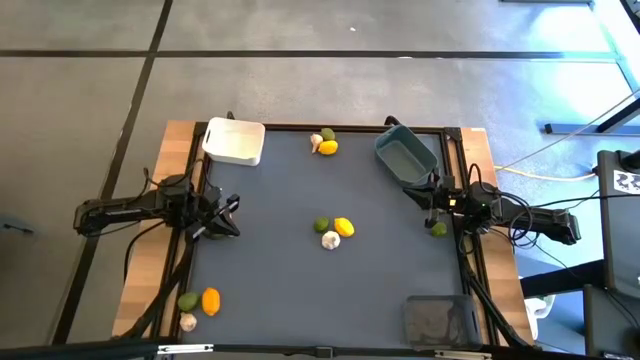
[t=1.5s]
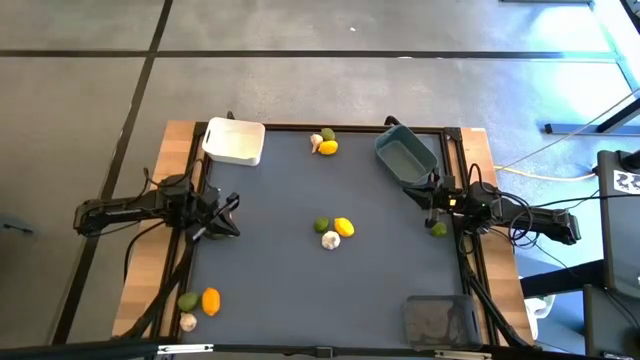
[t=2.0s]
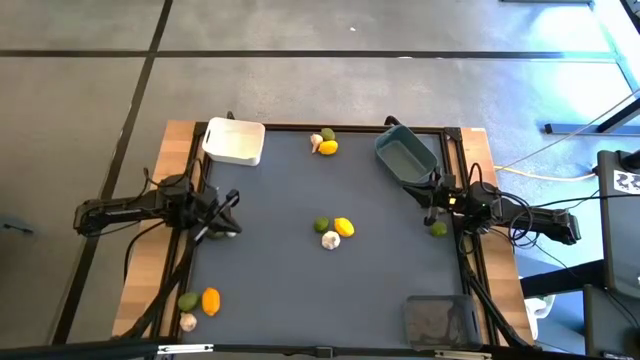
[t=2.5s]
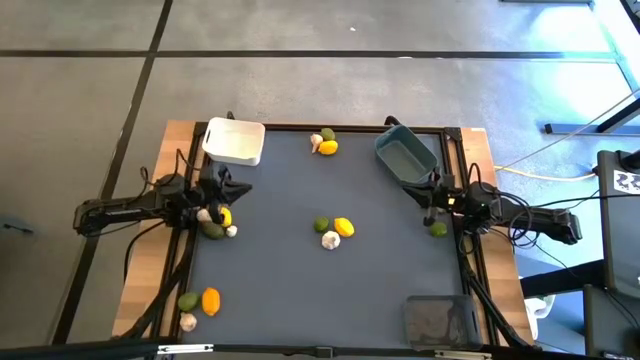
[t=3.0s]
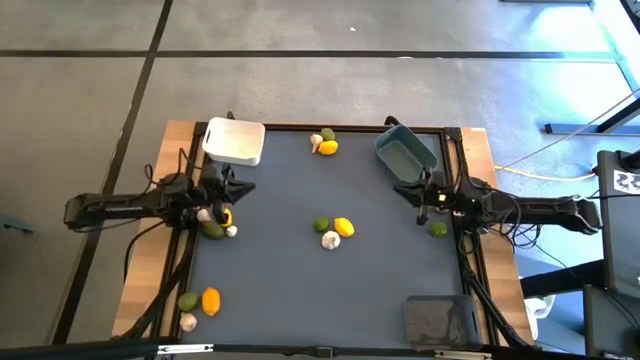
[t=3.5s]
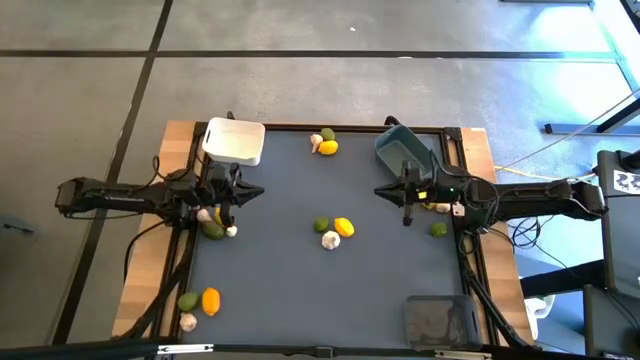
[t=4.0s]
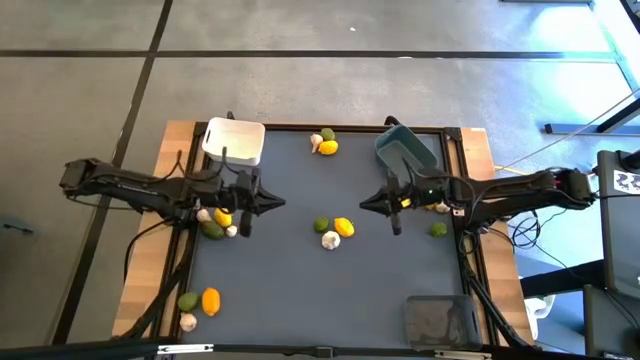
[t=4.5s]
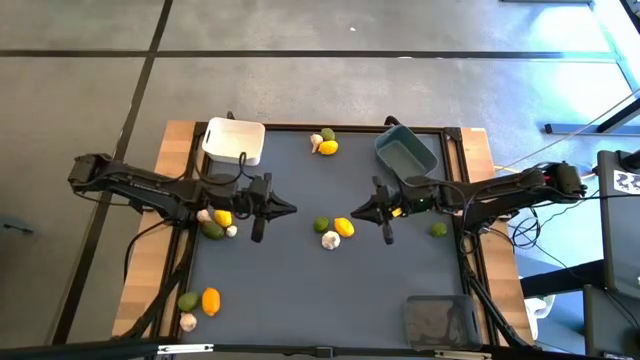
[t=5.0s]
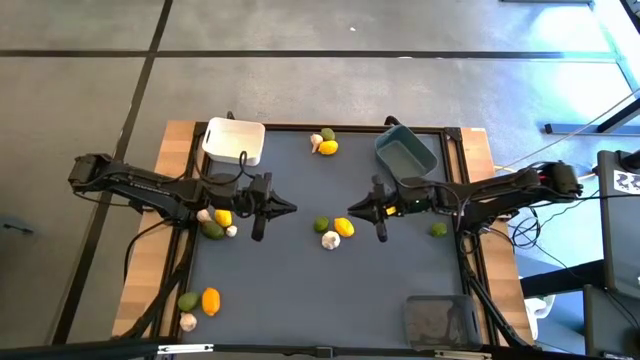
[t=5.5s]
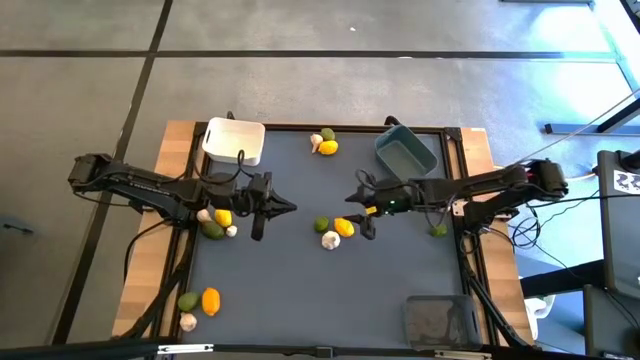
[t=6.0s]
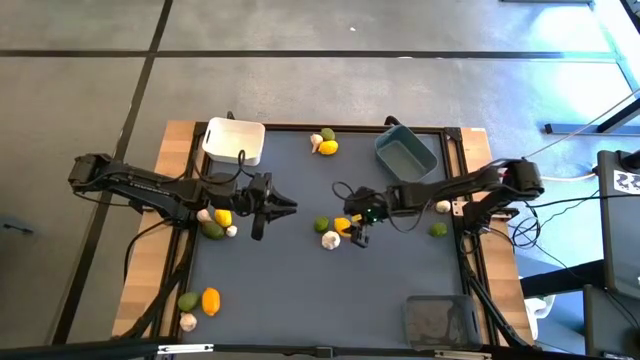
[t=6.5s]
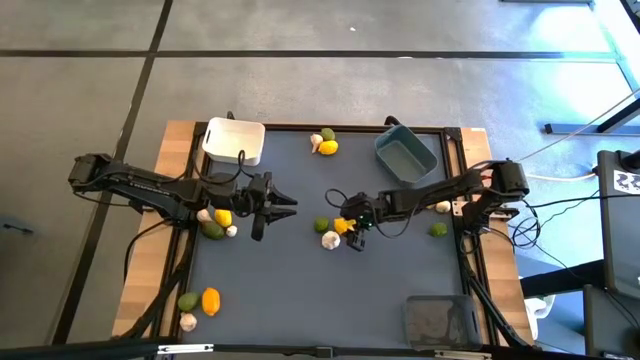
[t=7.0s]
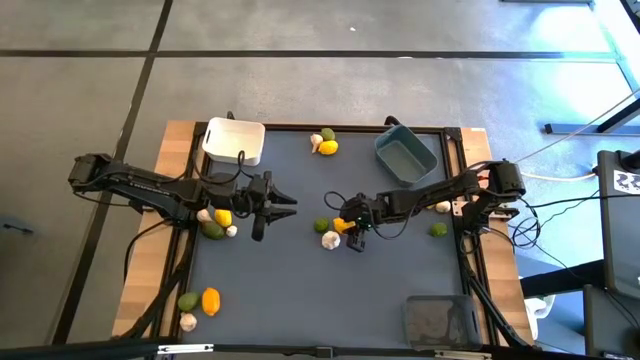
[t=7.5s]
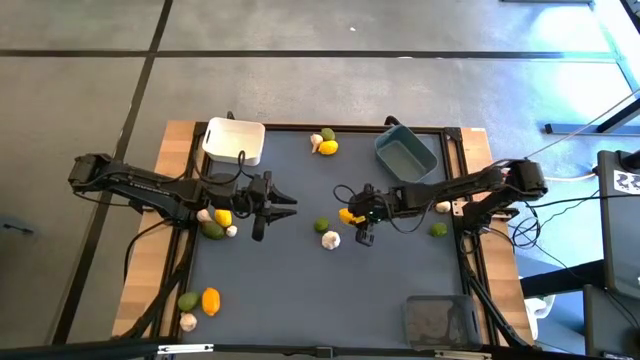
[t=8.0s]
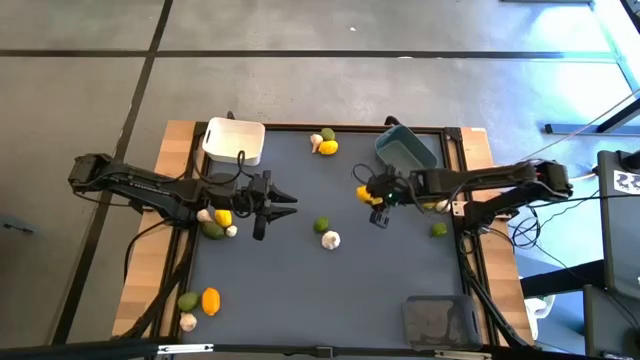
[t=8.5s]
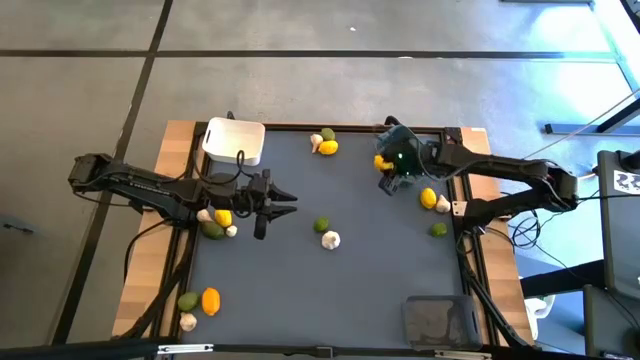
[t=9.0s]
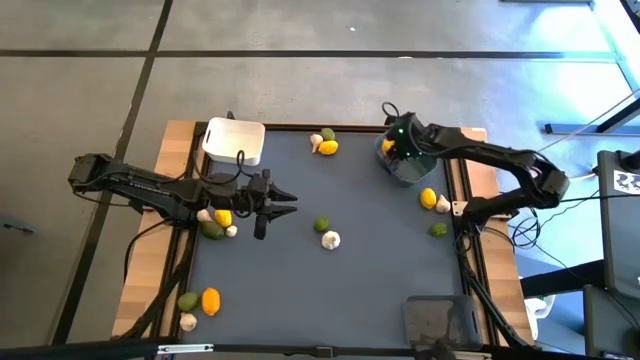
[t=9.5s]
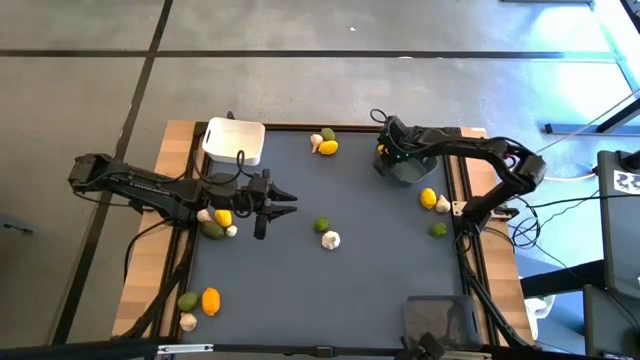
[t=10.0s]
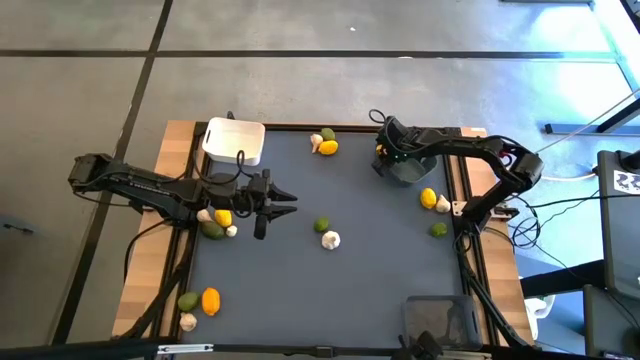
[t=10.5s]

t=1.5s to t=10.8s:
Task: Sort produce into baskets
Put the lemon into the blue bin

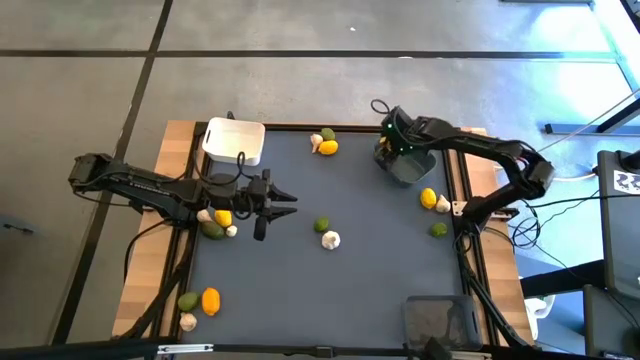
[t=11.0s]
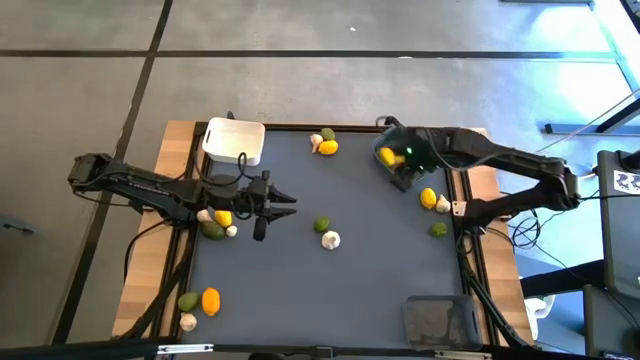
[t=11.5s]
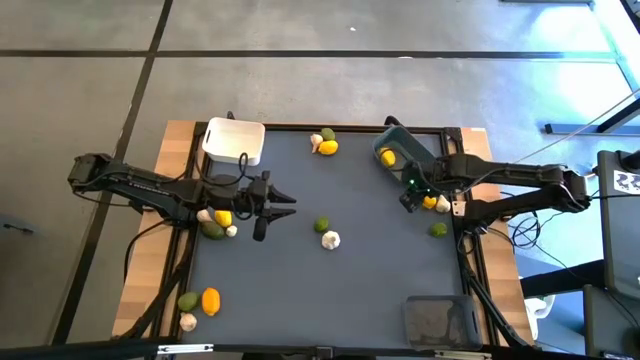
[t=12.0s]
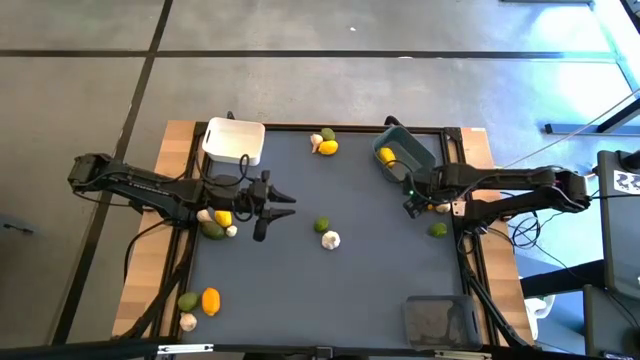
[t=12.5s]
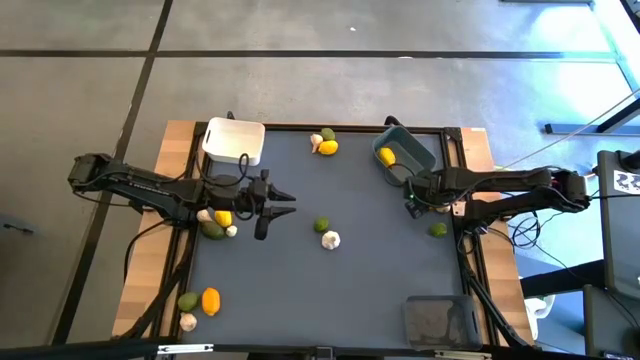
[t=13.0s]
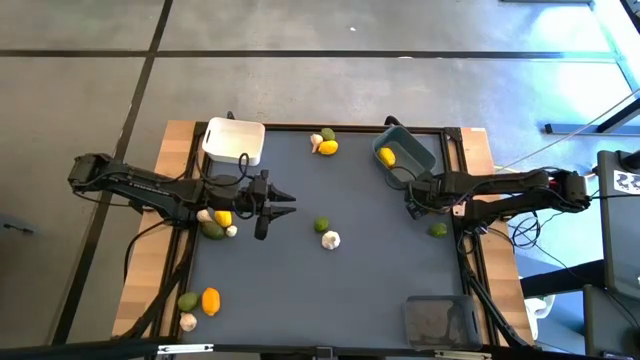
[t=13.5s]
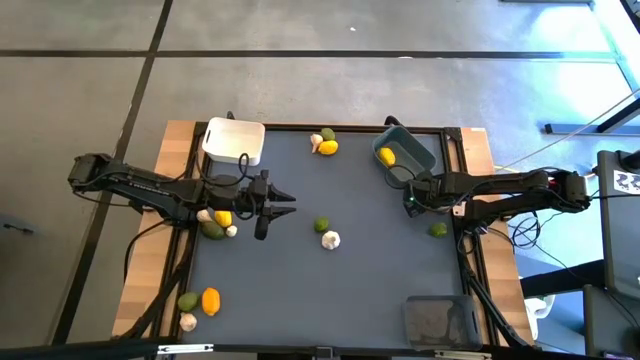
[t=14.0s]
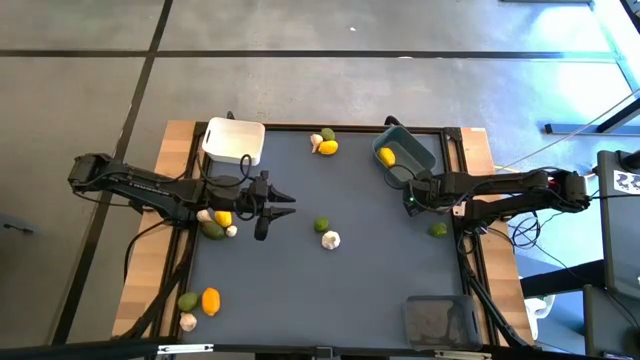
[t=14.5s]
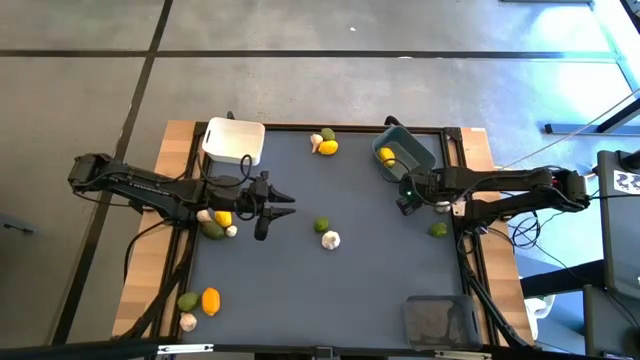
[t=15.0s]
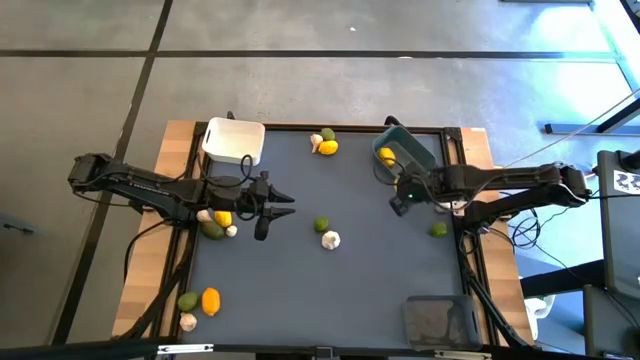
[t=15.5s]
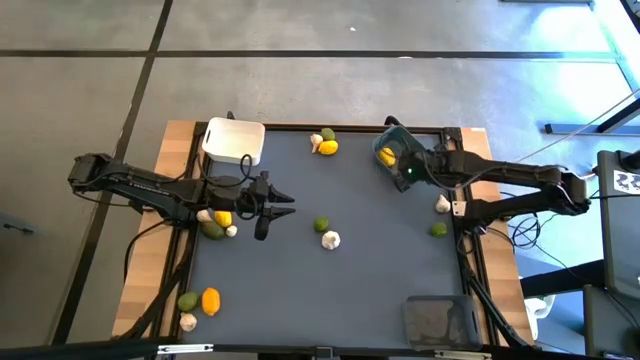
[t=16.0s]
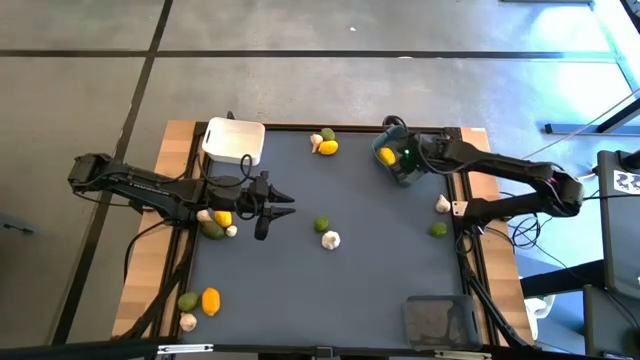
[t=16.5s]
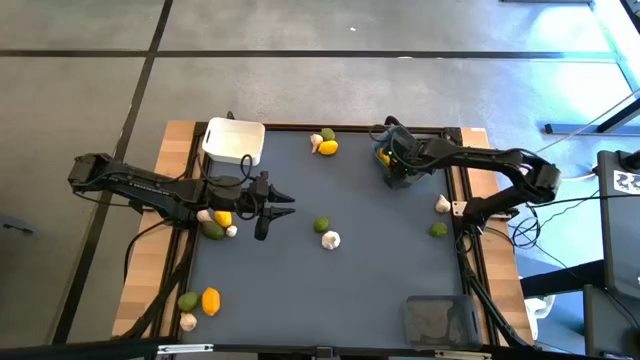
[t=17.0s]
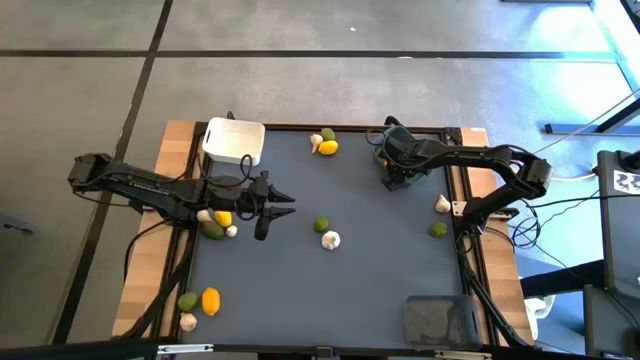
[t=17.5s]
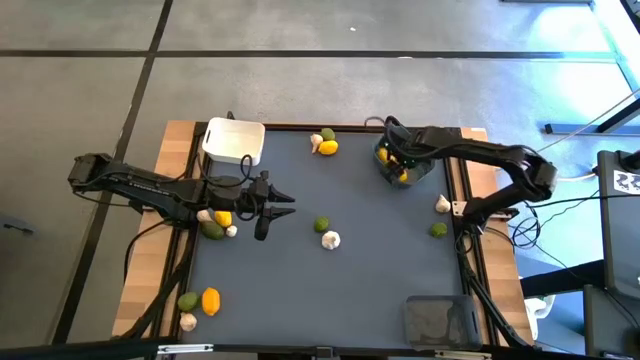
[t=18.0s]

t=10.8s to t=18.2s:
Put the lemon into the blue bin

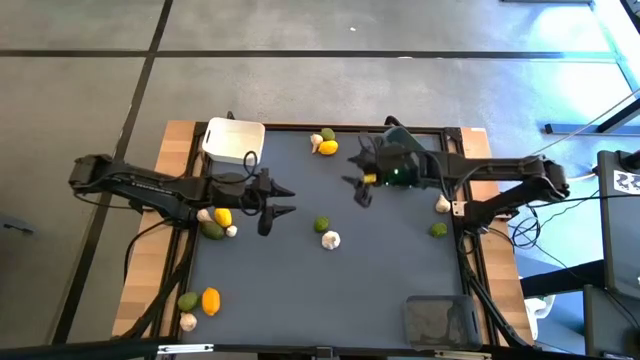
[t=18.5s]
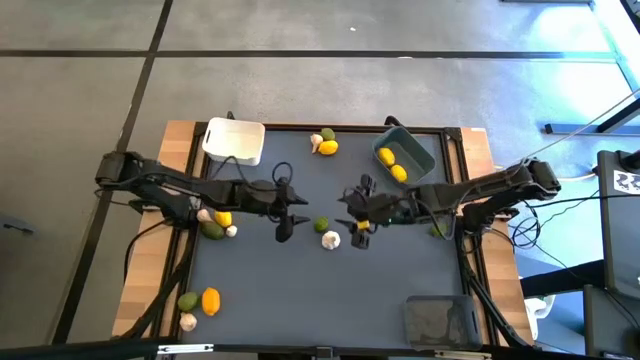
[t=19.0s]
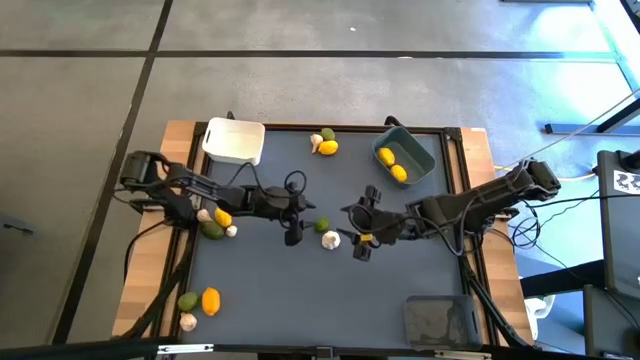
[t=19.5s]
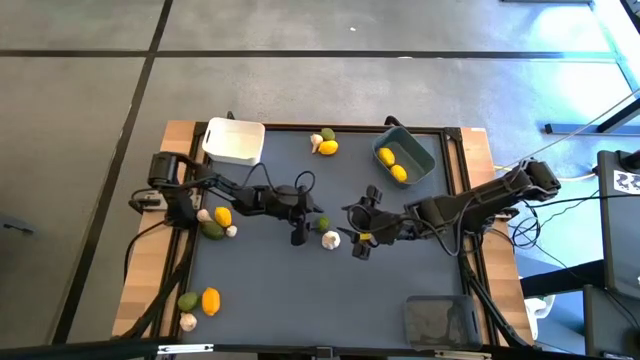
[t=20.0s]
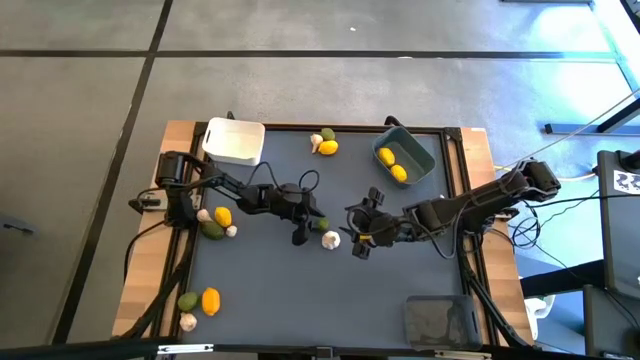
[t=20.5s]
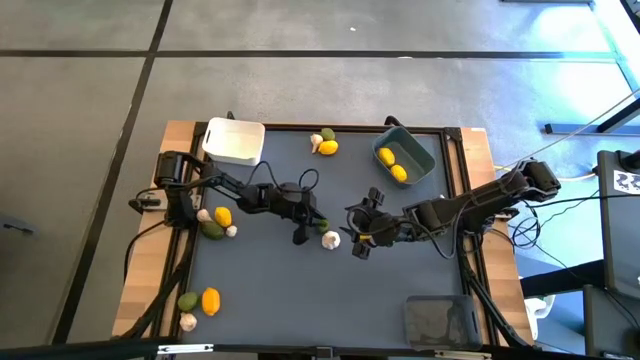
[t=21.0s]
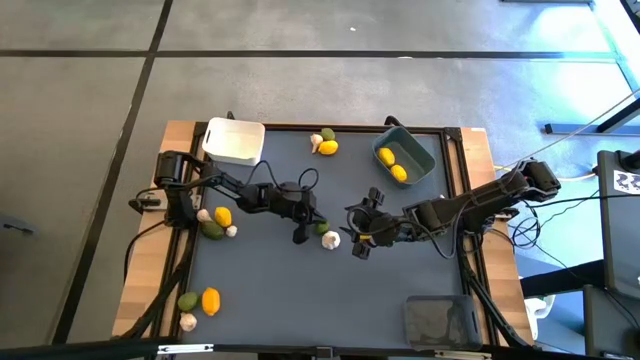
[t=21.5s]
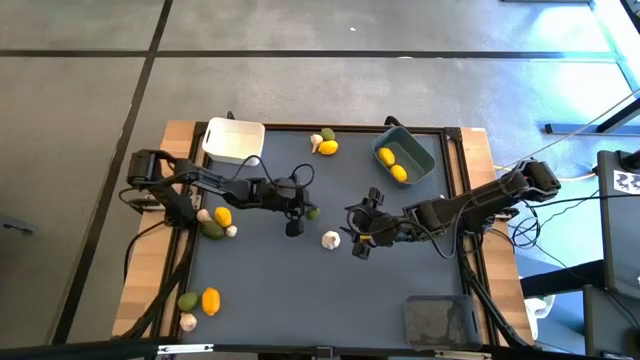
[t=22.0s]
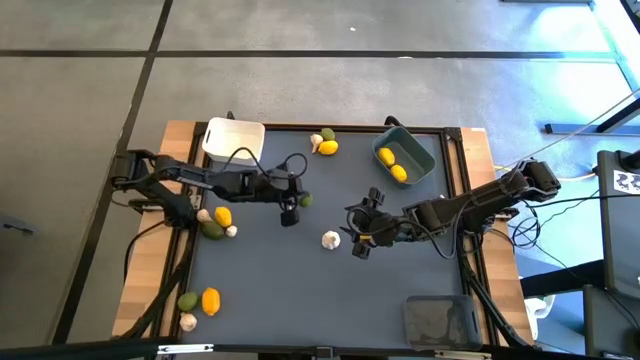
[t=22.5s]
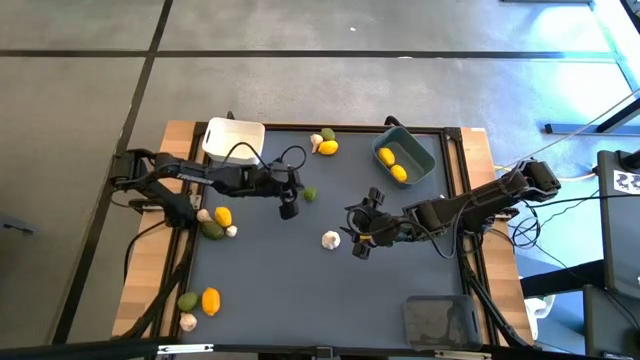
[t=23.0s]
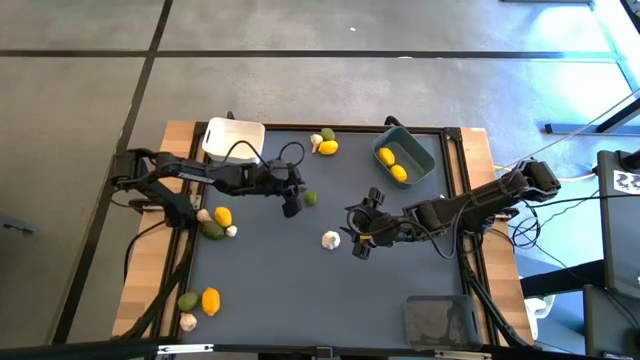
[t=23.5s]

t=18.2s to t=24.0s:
Put the lime into the white bin
